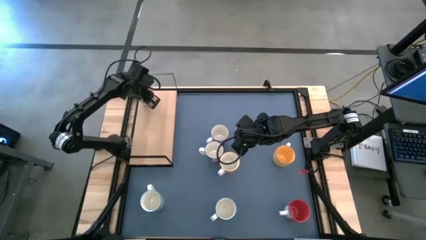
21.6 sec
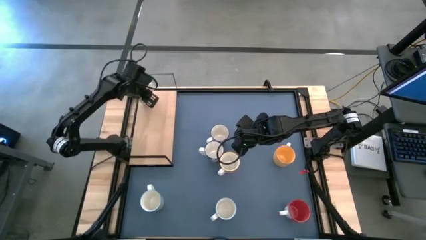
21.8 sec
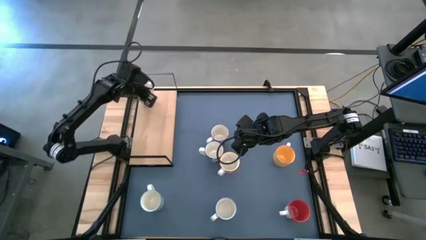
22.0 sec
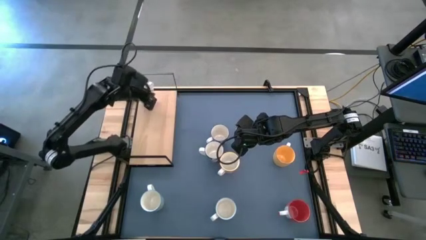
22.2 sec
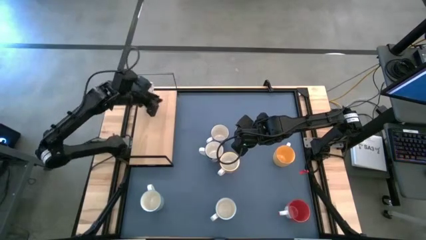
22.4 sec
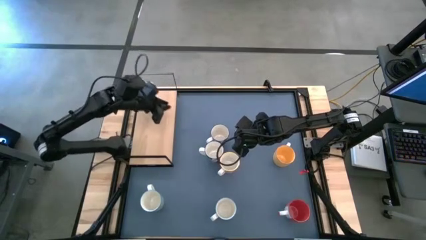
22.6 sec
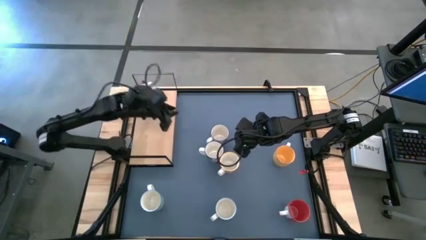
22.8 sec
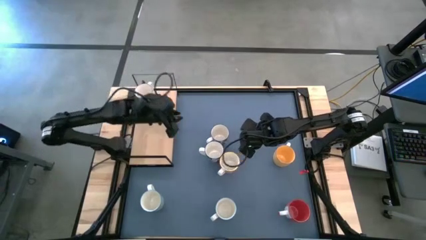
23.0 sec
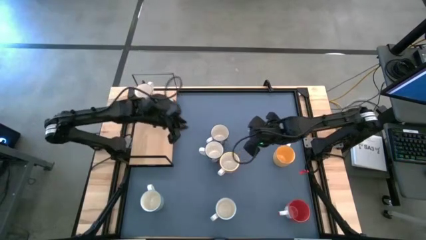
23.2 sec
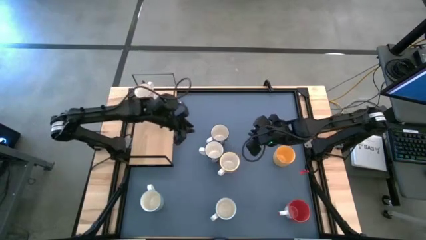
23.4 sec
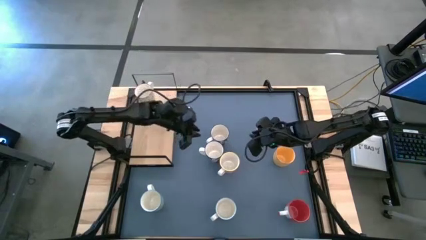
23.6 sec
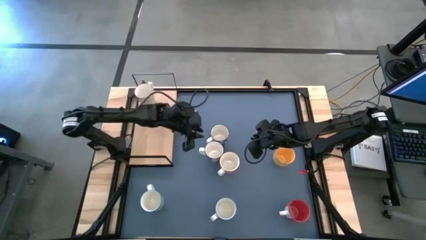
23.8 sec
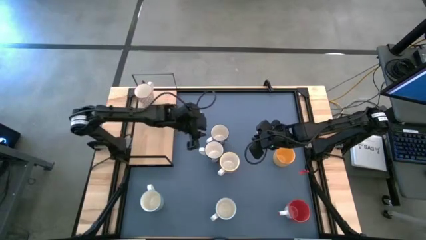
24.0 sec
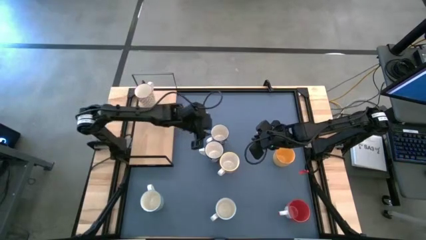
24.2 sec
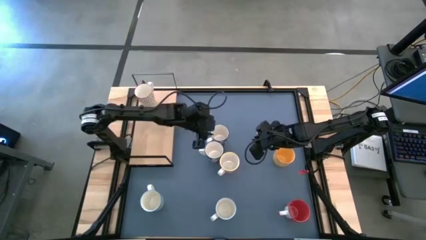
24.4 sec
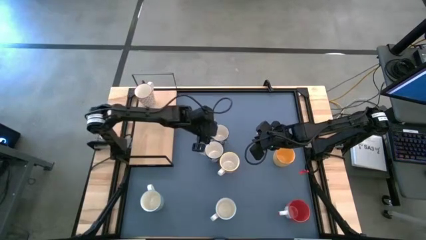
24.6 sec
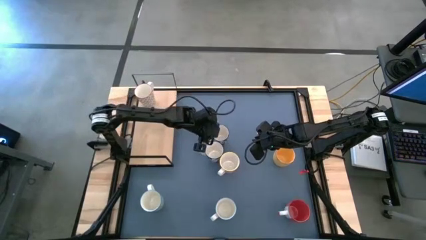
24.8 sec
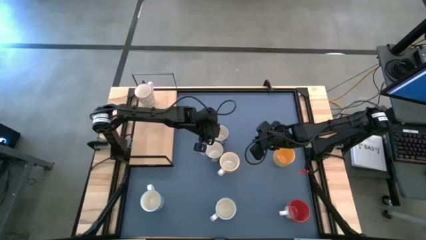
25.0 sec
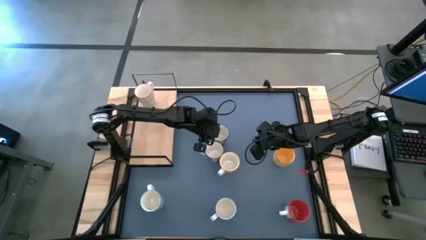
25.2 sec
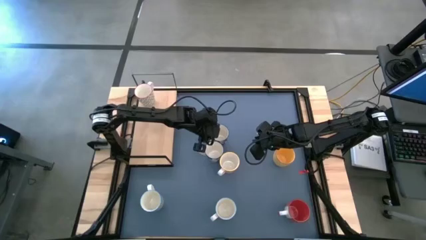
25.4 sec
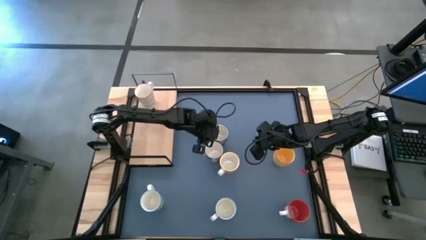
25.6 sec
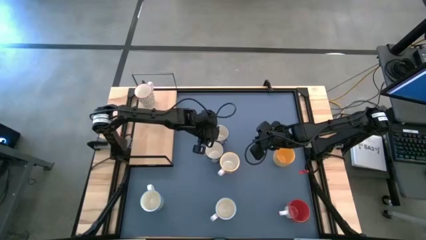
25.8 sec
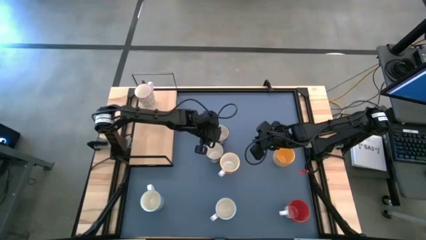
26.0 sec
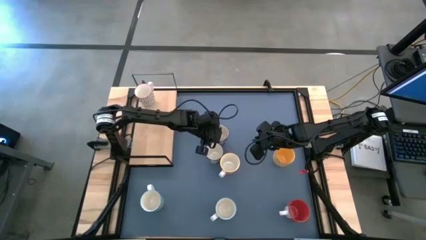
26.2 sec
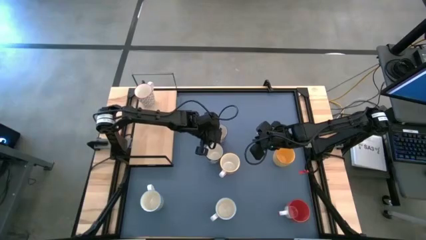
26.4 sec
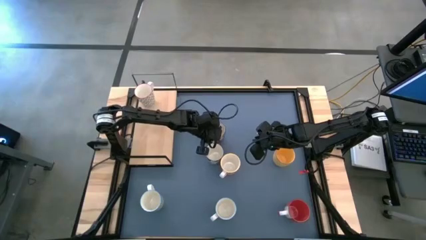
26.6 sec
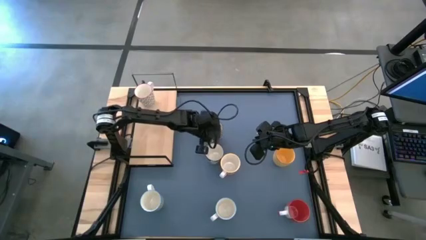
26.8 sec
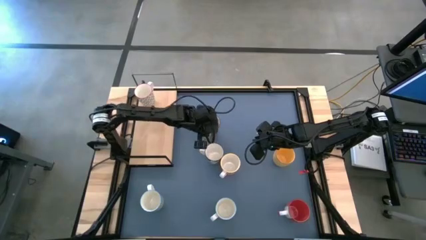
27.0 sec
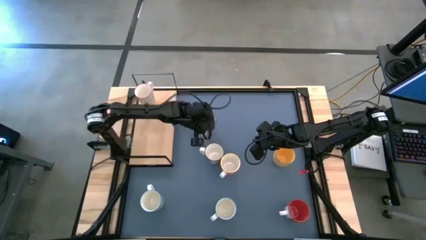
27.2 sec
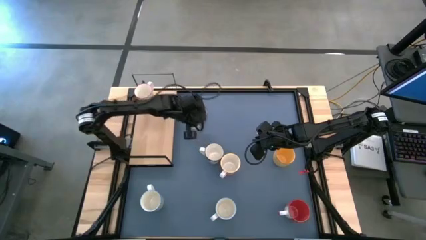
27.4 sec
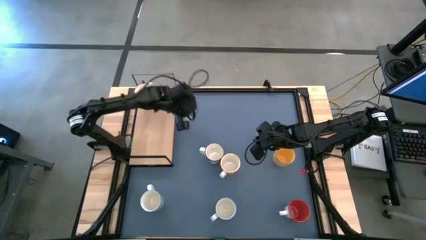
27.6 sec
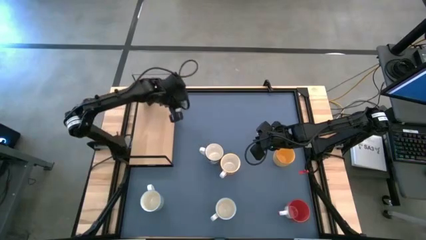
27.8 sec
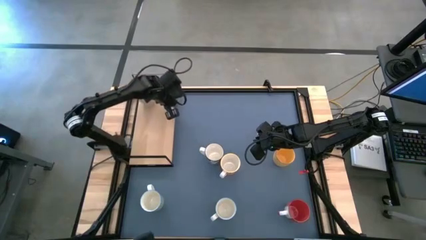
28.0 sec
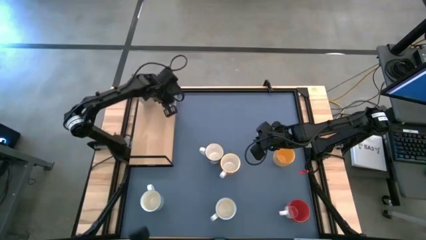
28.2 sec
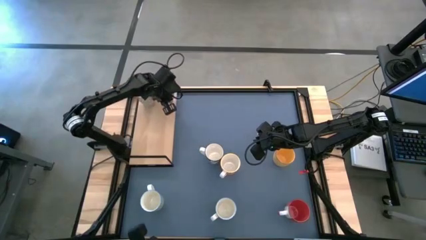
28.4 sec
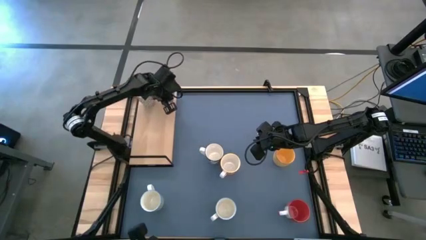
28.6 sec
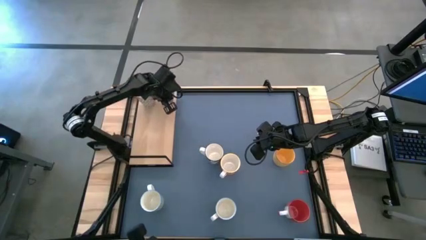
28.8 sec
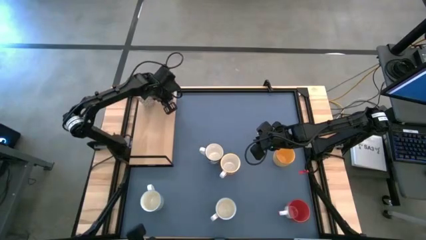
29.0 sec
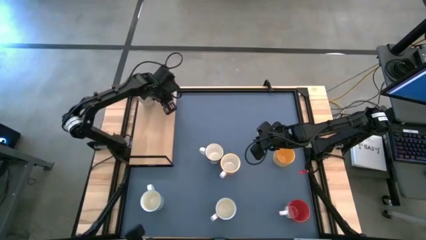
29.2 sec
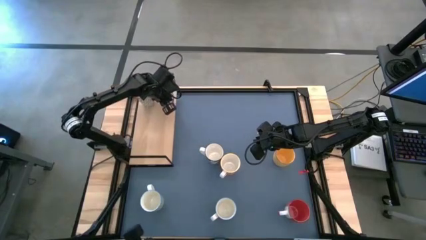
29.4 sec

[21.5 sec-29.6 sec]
Task: Place coffee mugs
Put the top blue patterned mug on the shelf

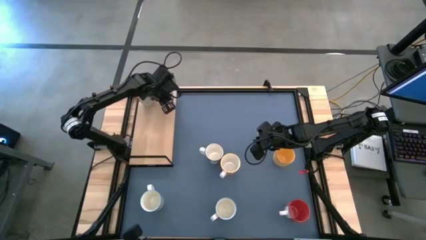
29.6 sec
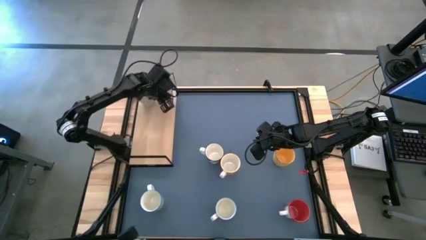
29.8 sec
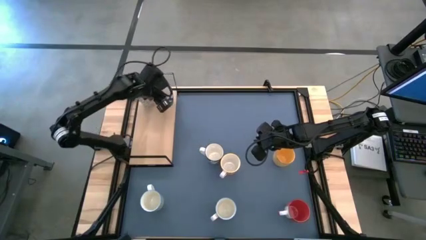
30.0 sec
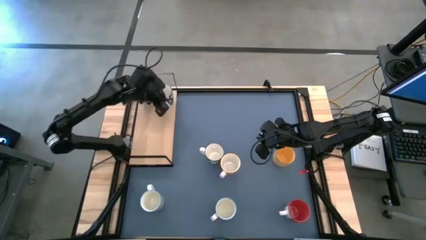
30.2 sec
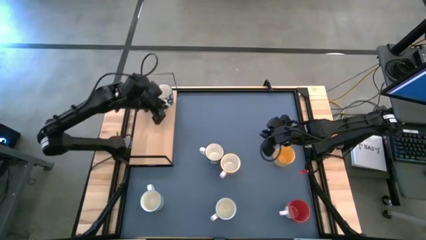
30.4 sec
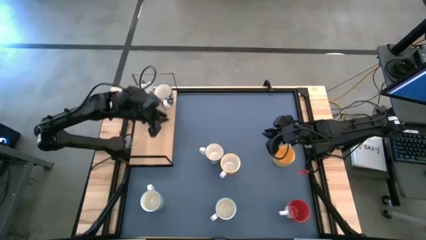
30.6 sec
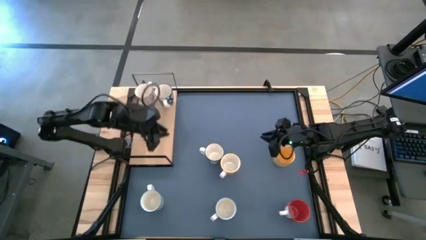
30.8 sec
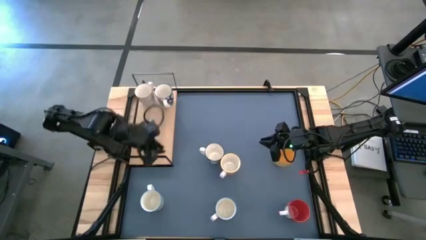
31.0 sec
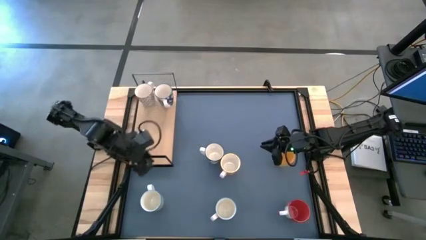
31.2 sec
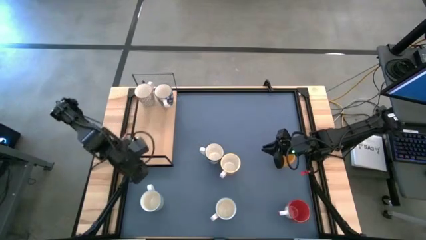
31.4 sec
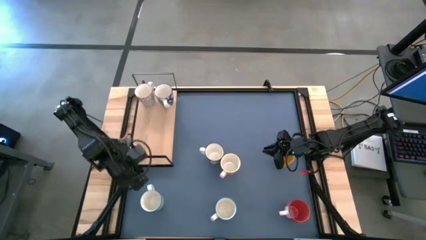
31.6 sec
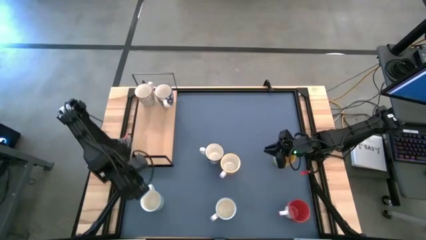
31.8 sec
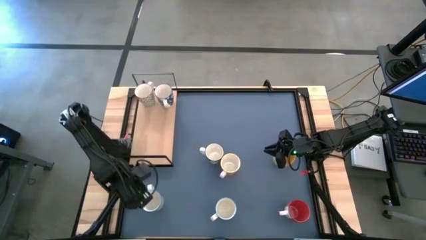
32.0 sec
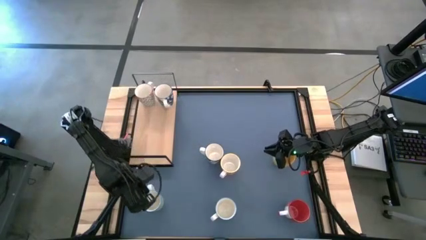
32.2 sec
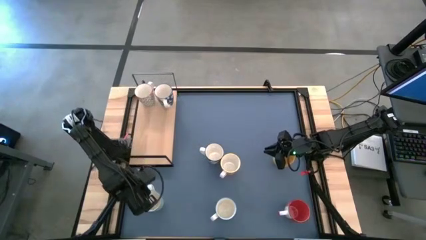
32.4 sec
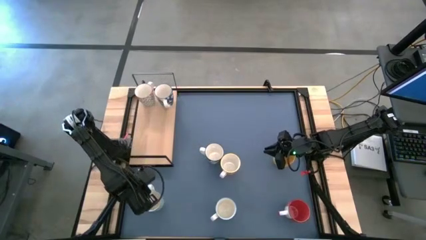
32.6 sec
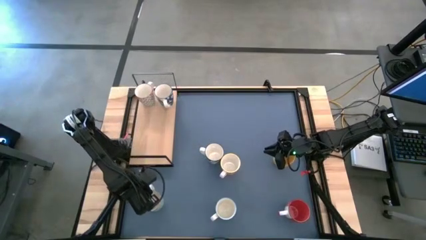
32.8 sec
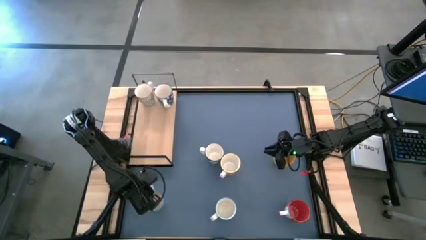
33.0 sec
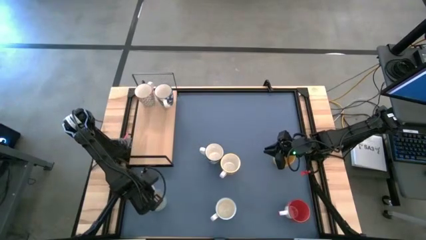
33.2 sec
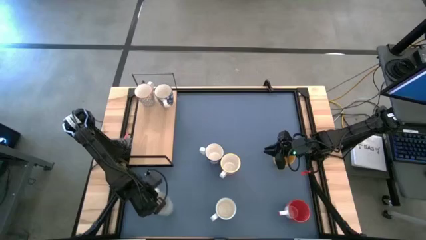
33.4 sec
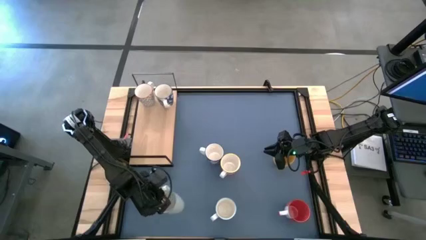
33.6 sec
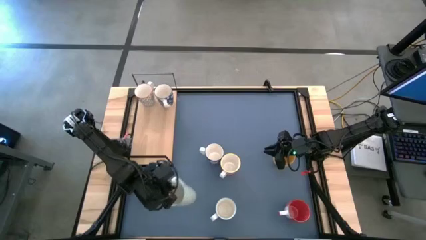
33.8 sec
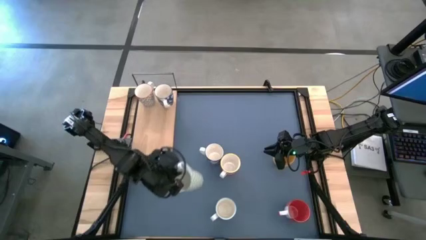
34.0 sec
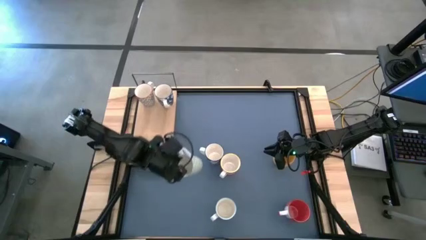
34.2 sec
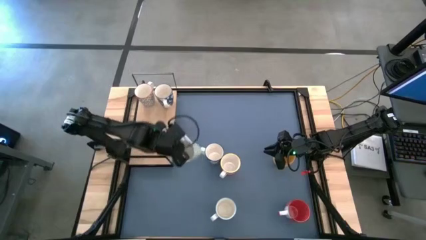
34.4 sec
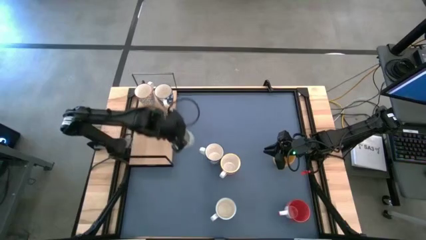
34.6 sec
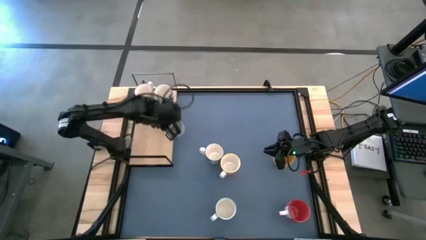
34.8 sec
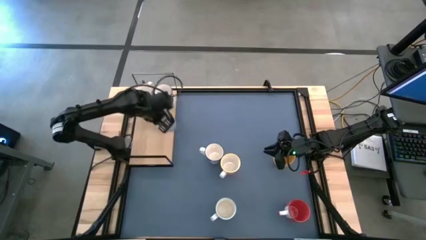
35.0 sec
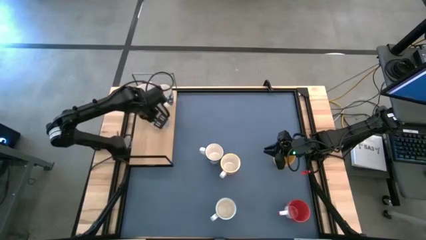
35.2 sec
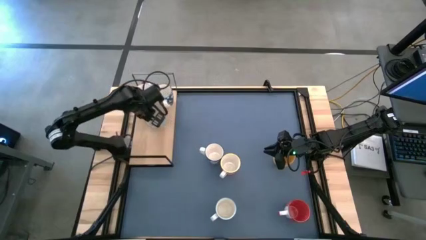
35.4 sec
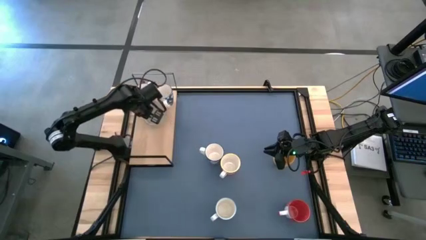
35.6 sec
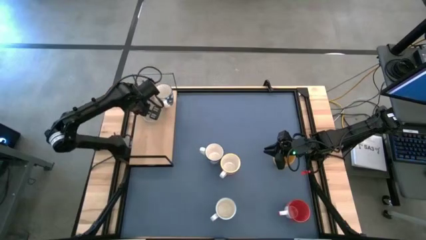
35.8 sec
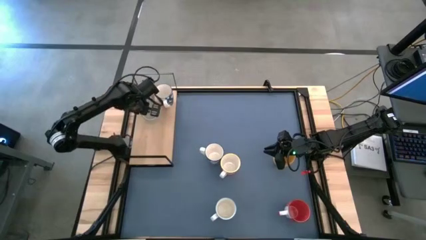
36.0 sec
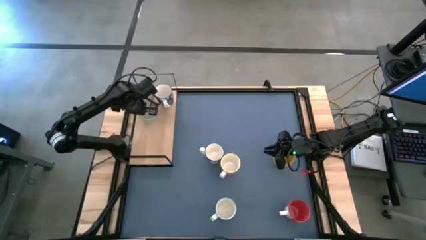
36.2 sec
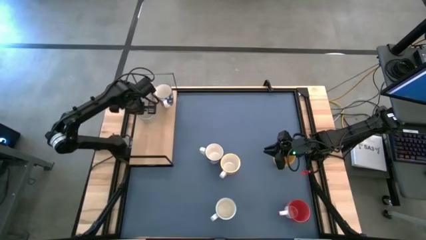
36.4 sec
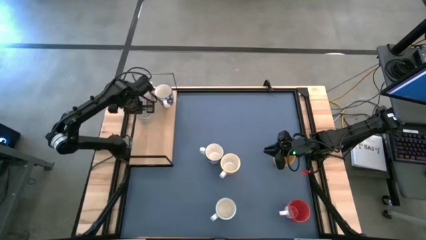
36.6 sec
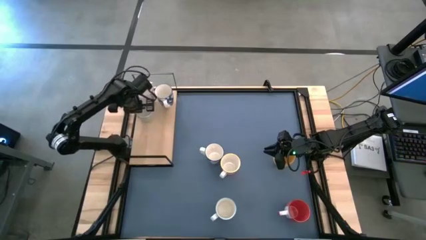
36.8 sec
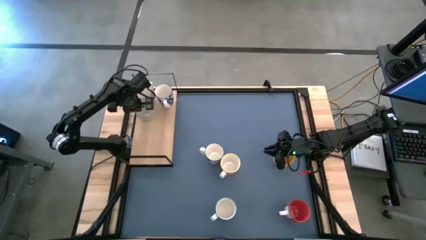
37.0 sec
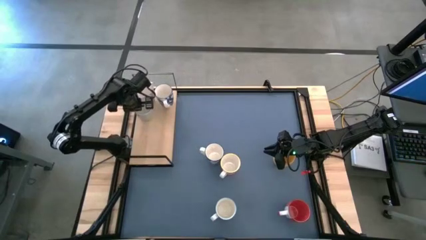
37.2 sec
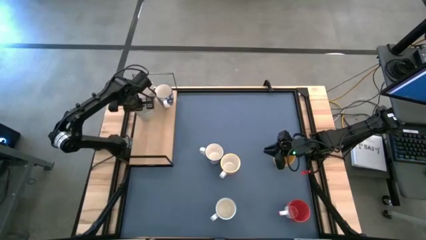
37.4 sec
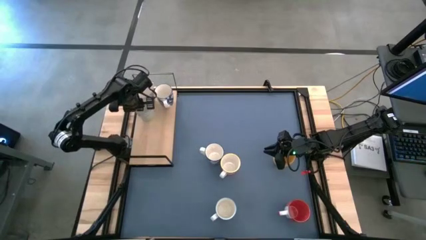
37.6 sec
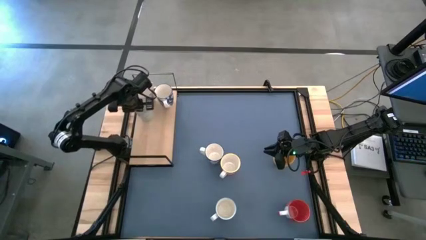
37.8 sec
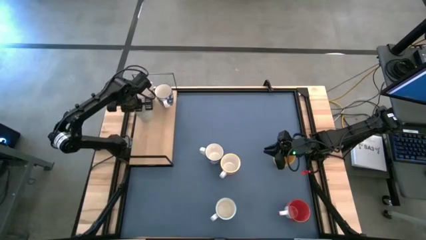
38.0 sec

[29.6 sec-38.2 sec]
Put the green patterned mug on the shelf
